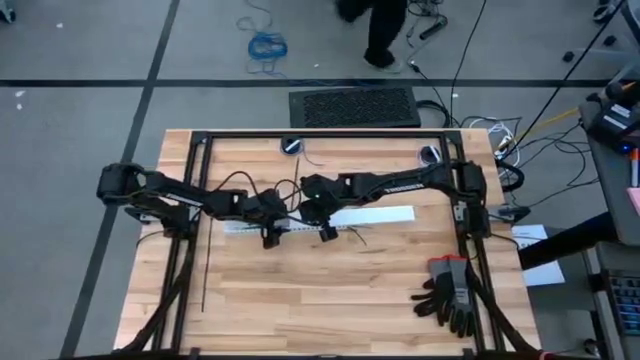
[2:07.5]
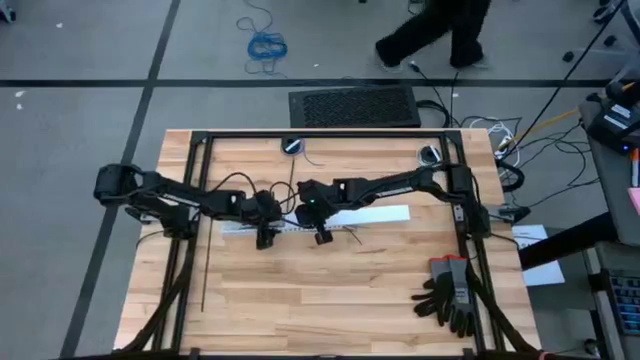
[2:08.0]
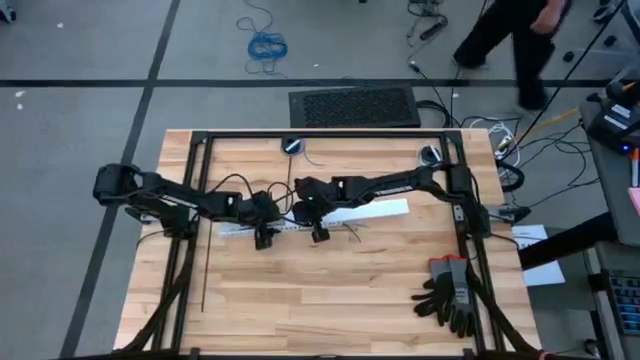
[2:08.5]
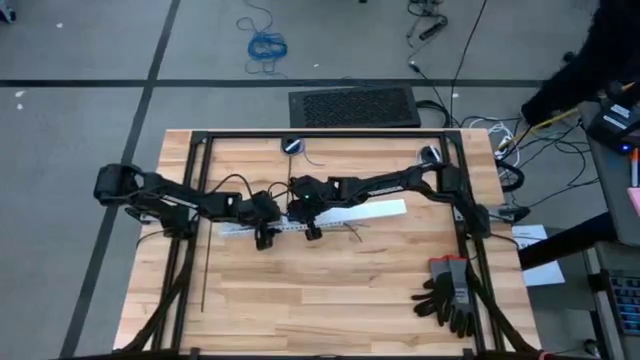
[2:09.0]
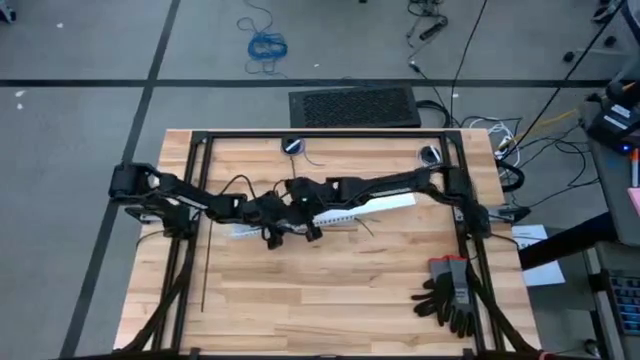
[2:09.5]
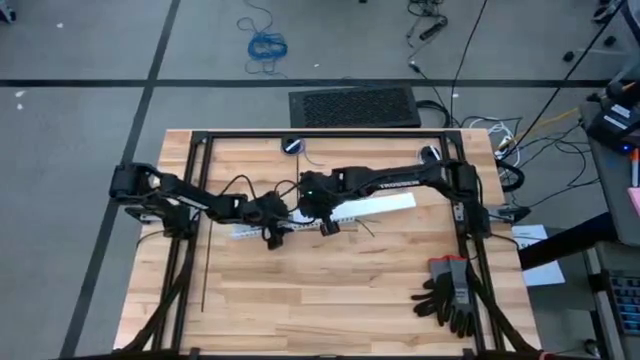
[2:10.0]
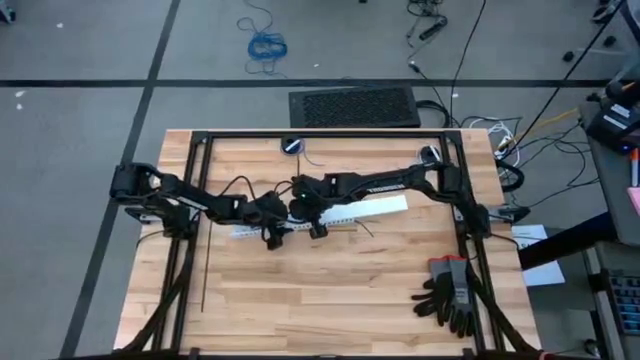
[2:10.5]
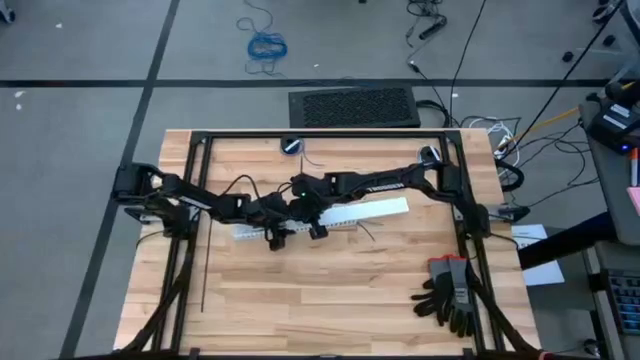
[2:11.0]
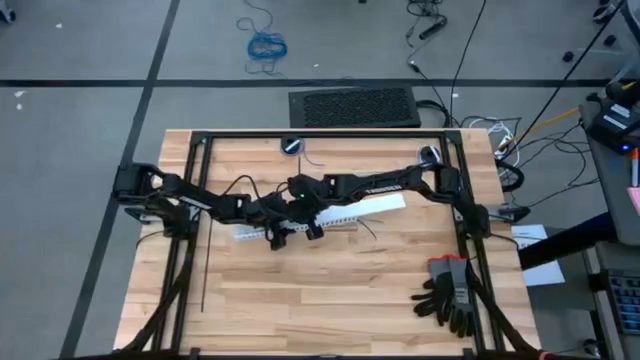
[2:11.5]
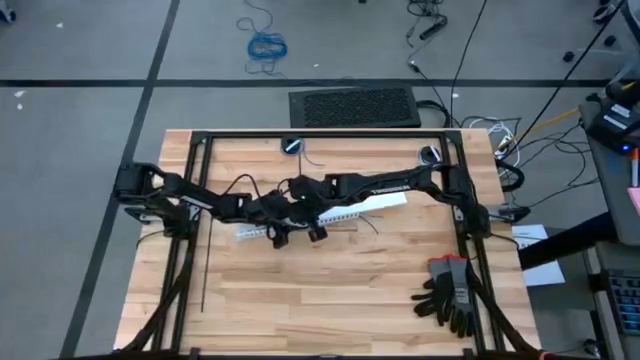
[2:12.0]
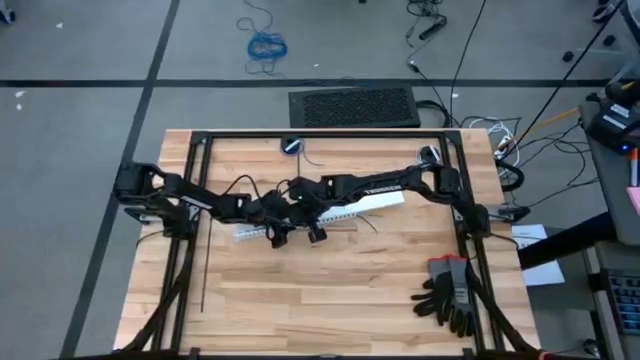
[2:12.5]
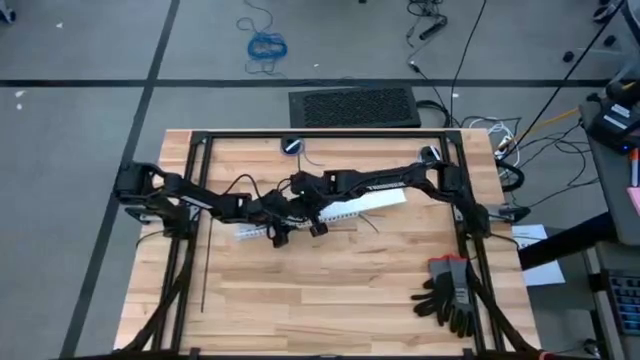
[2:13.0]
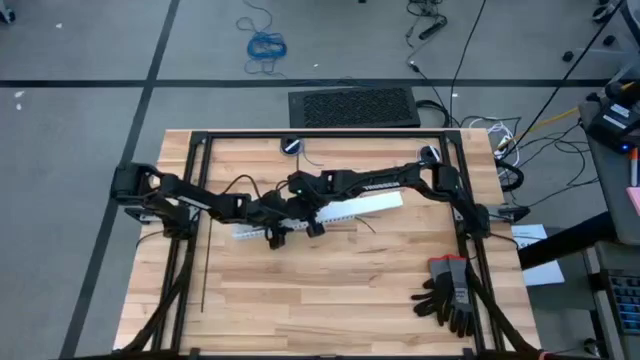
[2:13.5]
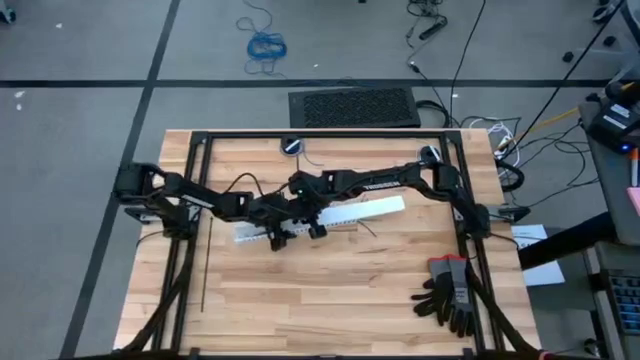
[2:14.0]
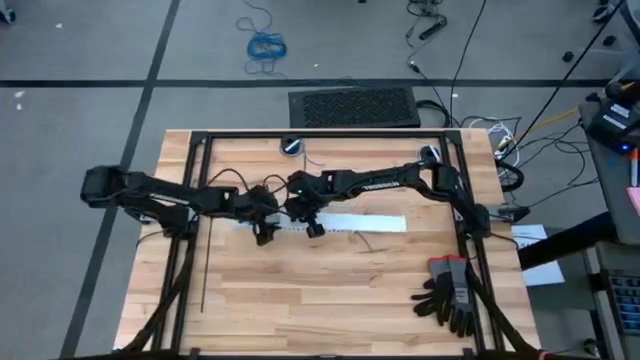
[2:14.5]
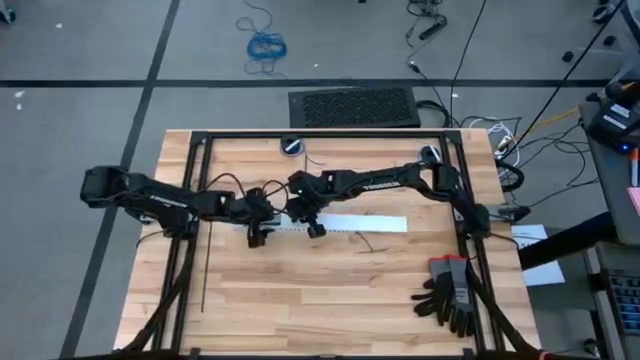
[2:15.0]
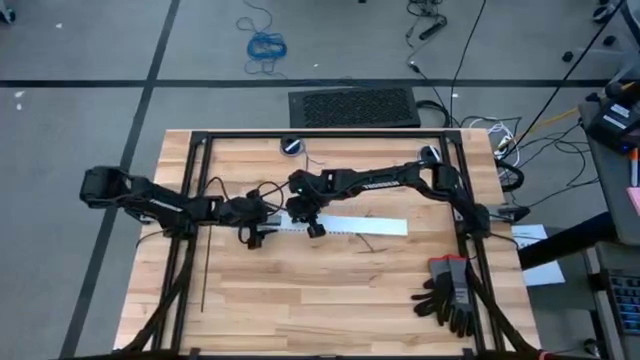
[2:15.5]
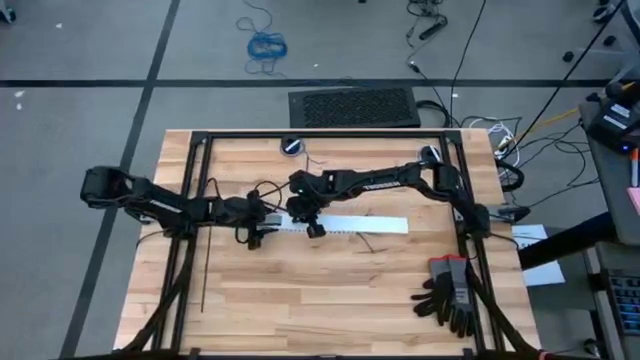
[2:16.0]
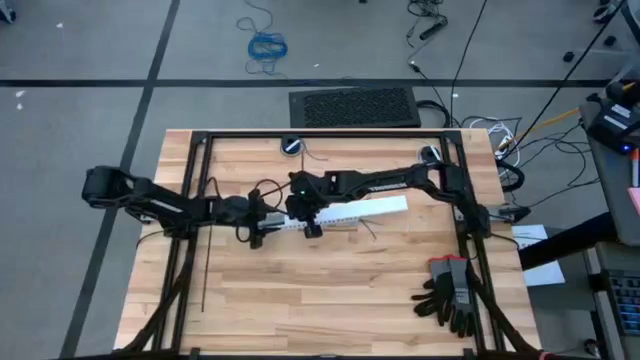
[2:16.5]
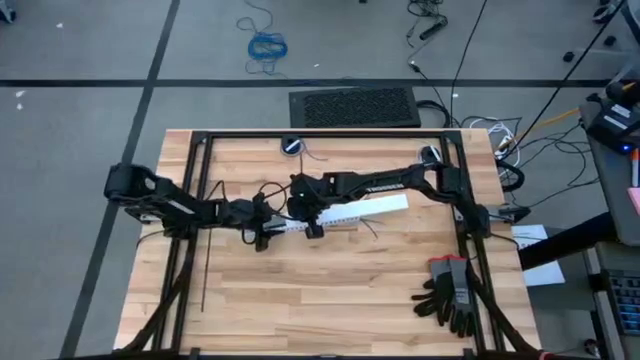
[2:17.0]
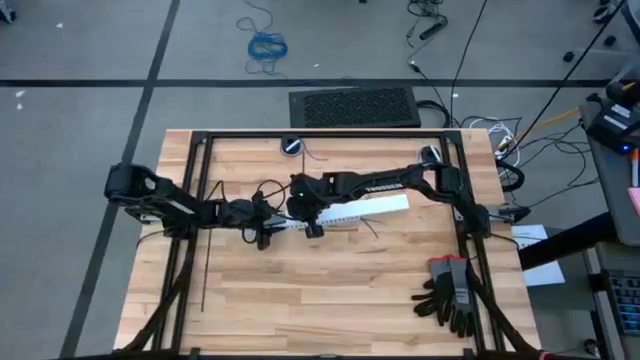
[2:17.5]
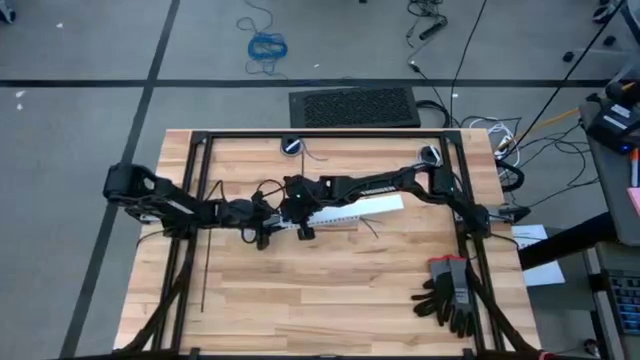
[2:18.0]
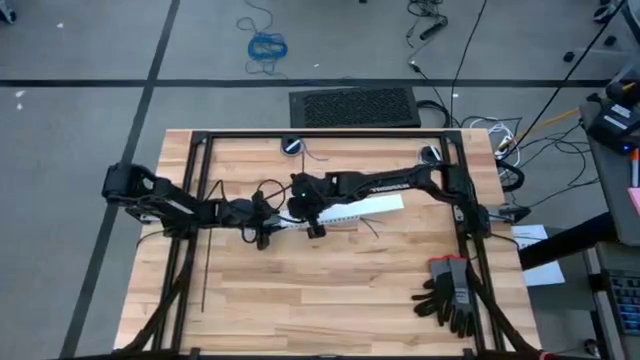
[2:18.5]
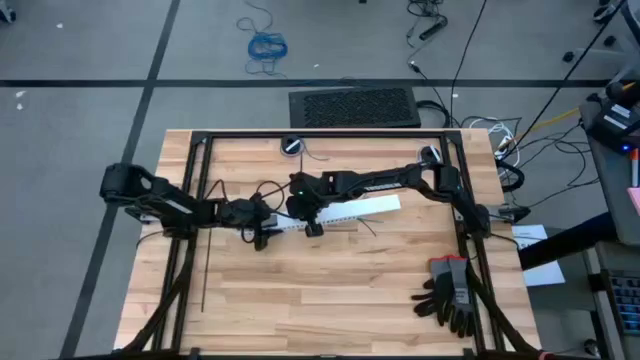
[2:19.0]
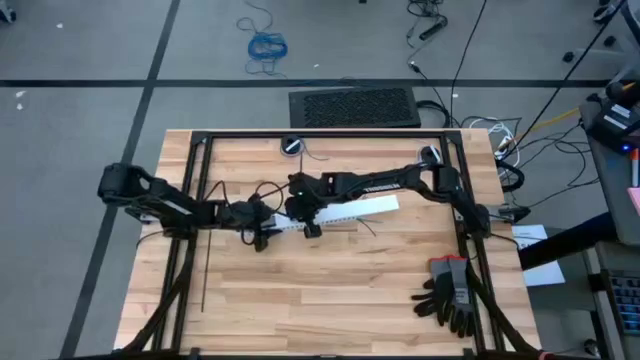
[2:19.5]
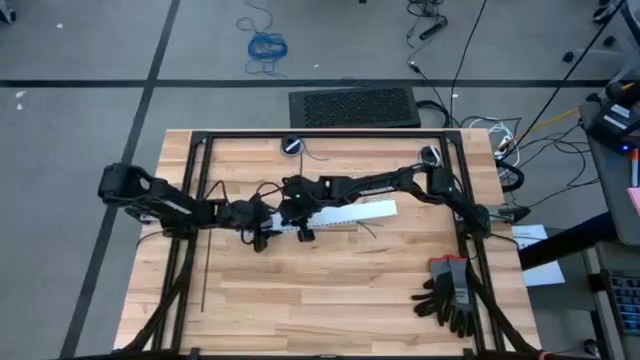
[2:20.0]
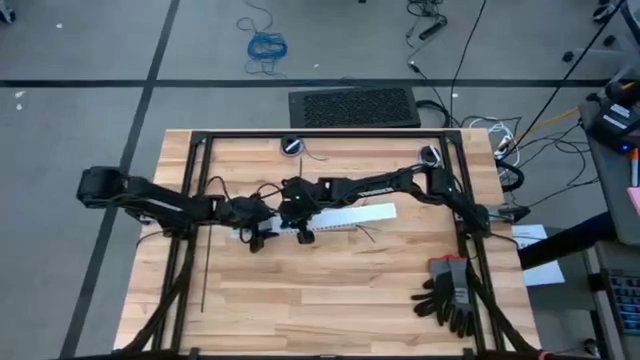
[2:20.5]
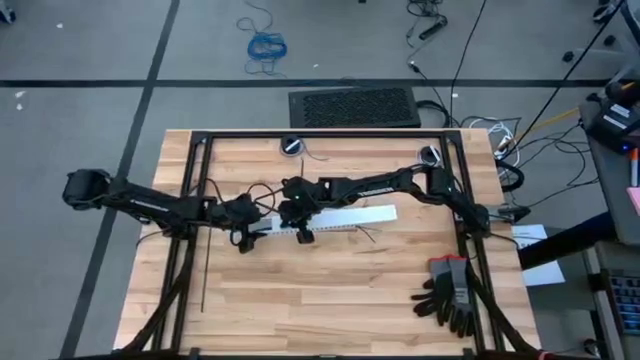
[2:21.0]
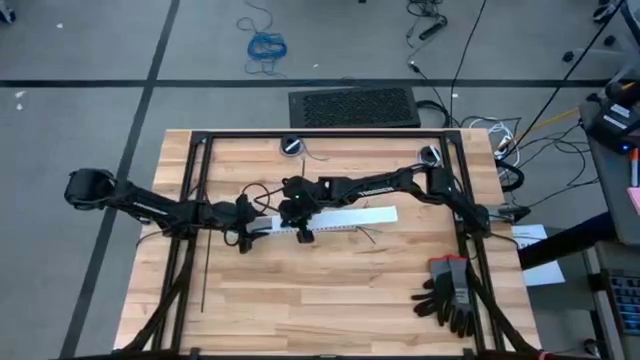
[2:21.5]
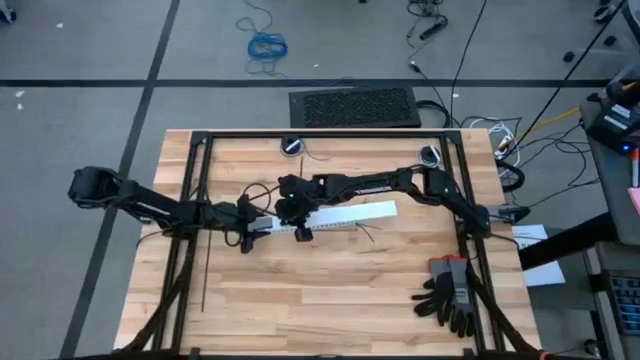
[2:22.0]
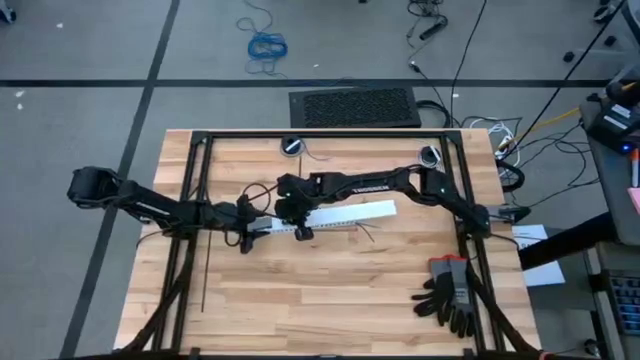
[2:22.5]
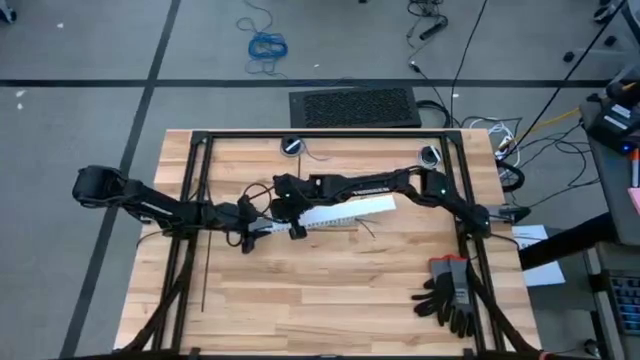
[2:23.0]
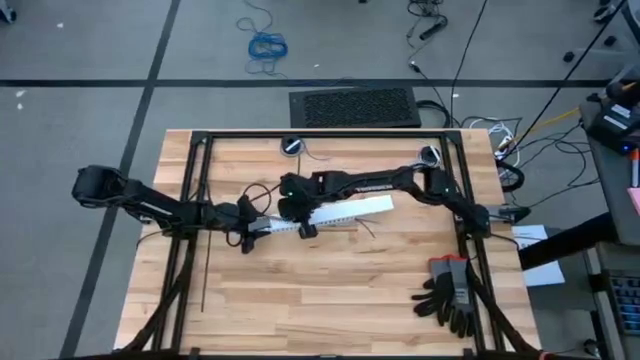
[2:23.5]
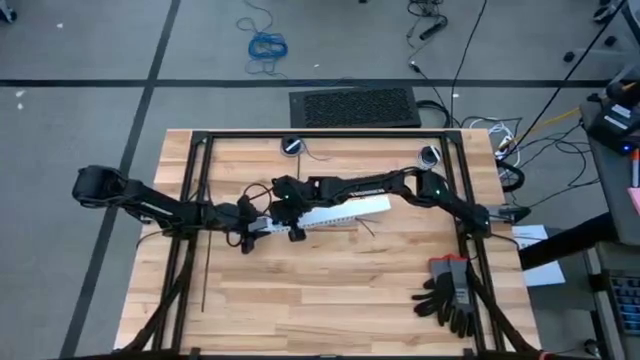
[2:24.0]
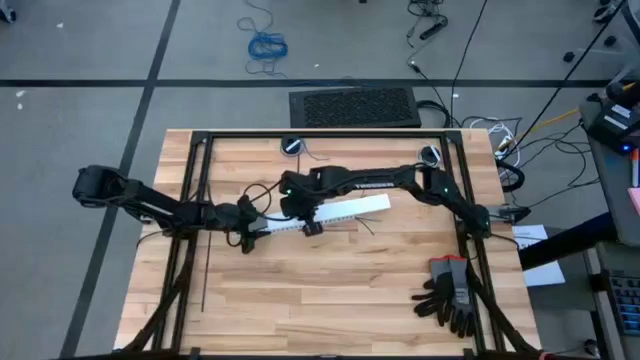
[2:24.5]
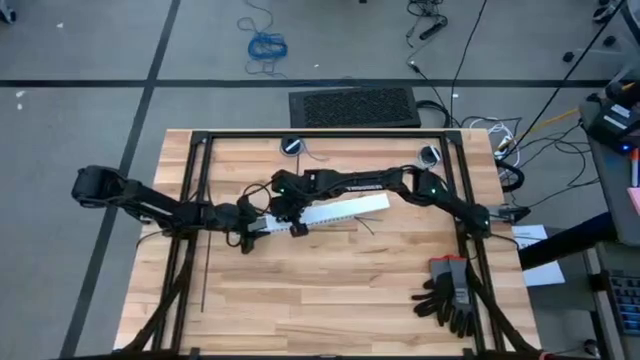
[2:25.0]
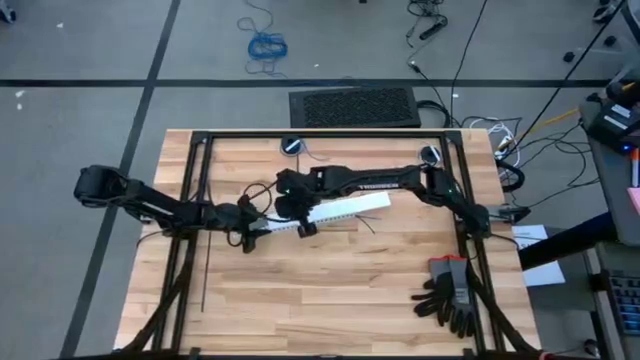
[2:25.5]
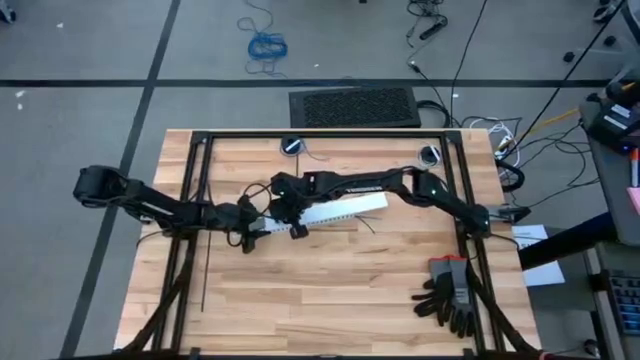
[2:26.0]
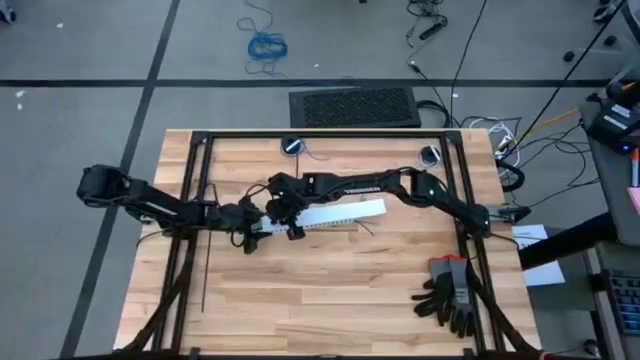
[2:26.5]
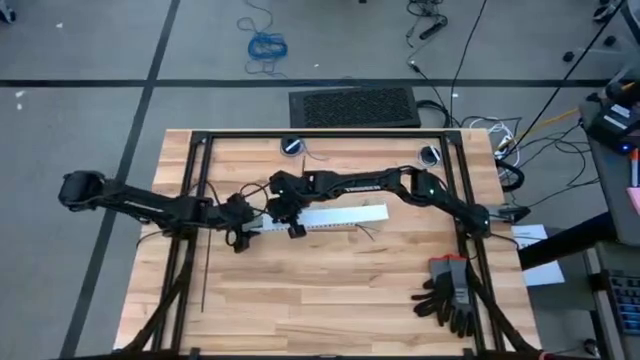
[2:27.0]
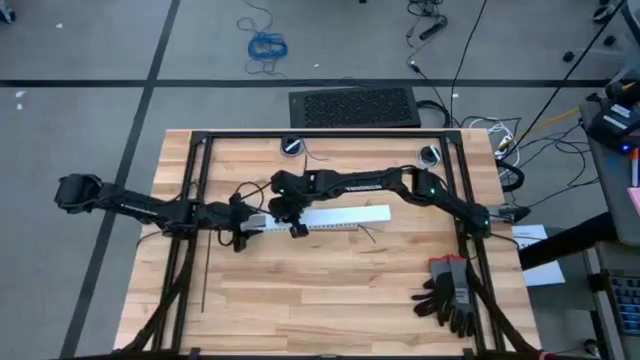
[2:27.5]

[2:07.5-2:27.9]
Task: Ziptie cables
Close the cable duct
